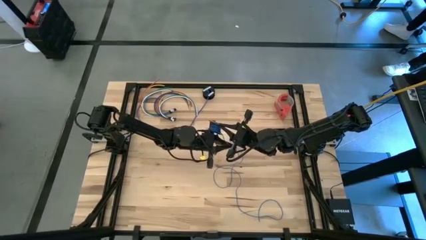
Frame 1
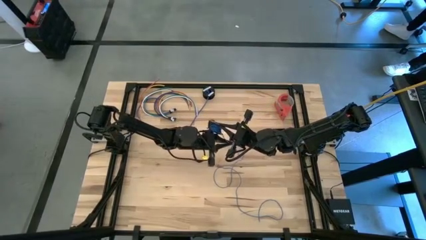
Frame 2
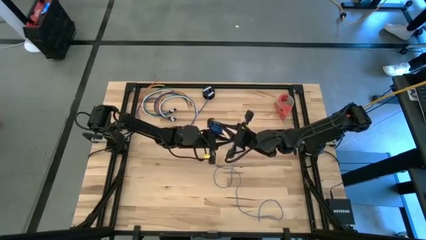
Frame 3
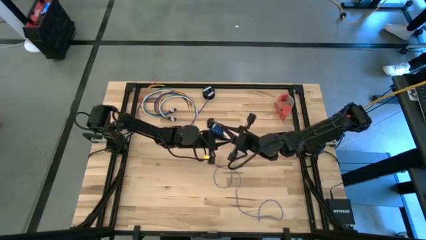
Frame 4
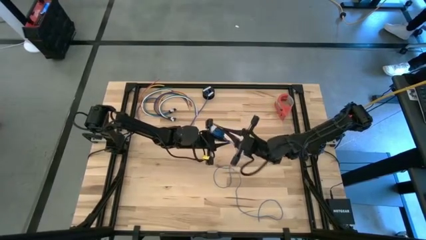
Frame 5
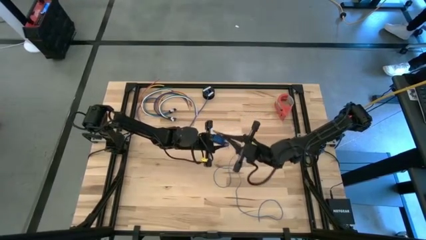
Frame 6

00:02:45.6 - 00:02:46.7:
Task: Coil cords
Coil the blue wire onto the black spool

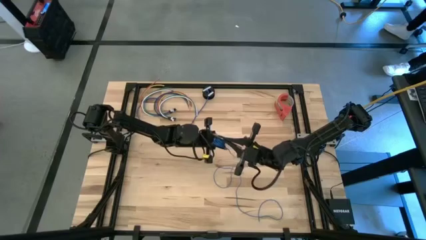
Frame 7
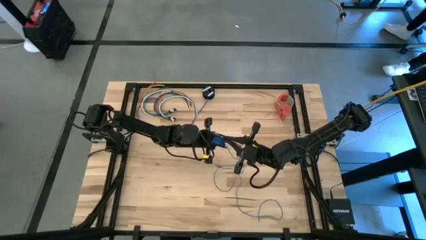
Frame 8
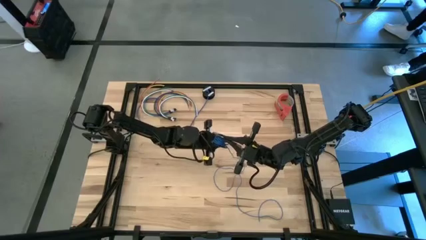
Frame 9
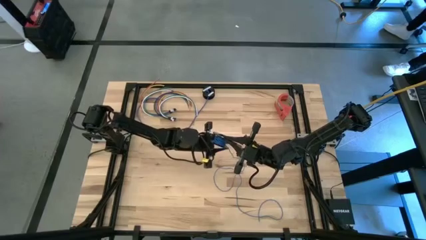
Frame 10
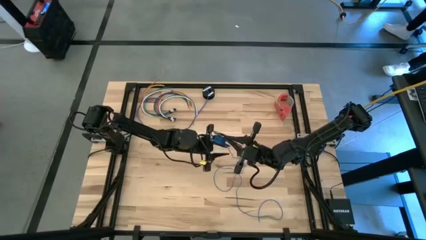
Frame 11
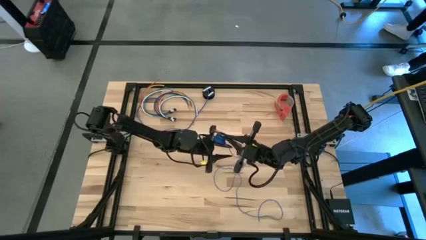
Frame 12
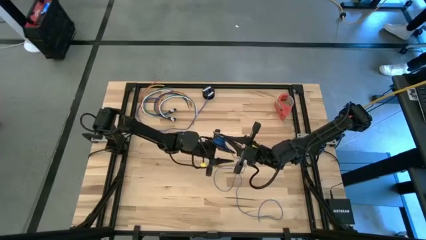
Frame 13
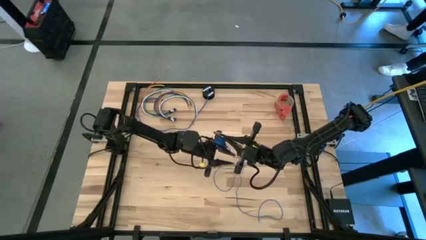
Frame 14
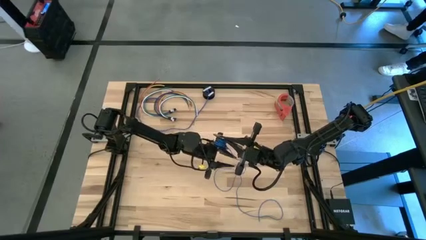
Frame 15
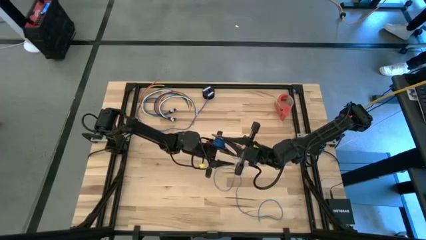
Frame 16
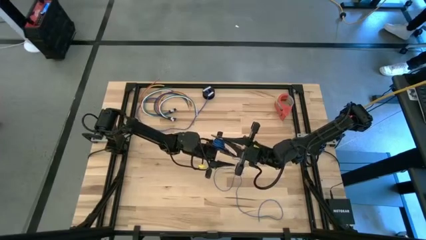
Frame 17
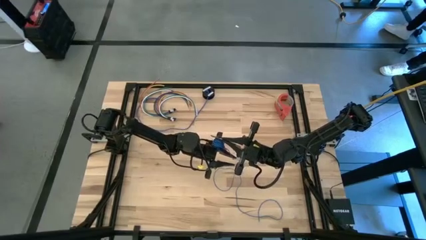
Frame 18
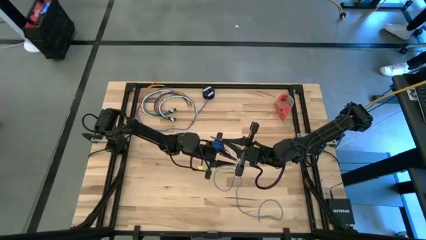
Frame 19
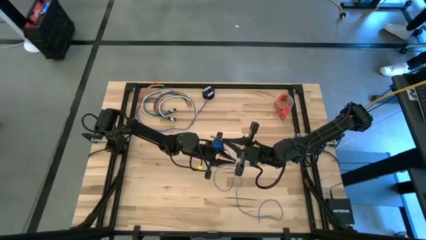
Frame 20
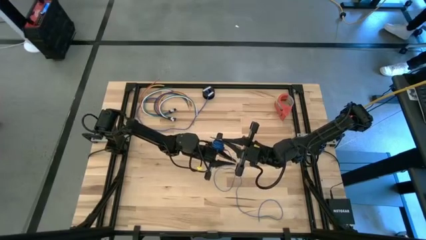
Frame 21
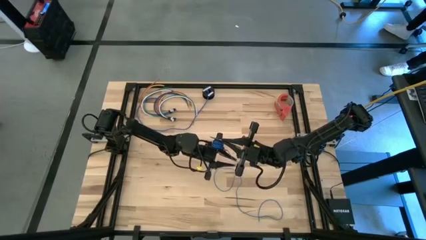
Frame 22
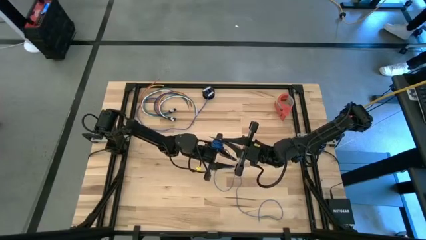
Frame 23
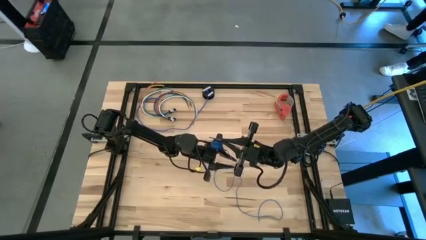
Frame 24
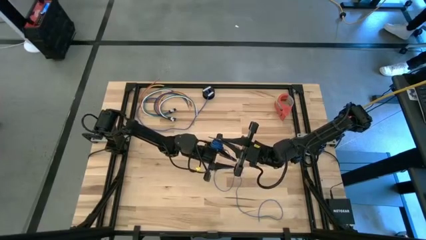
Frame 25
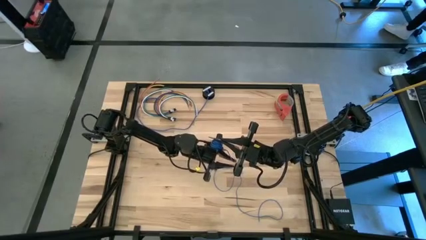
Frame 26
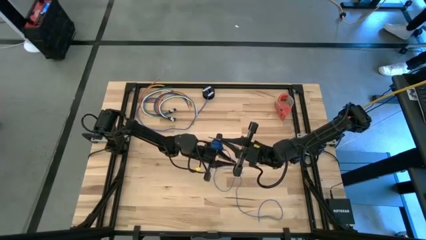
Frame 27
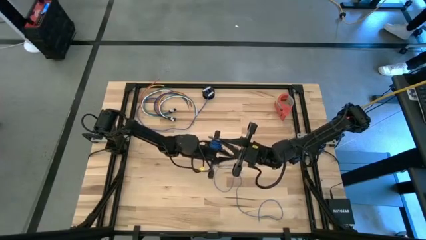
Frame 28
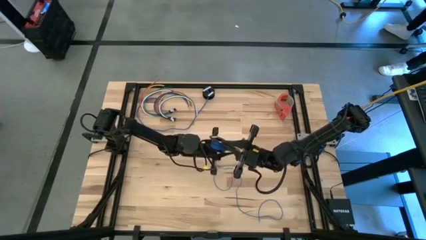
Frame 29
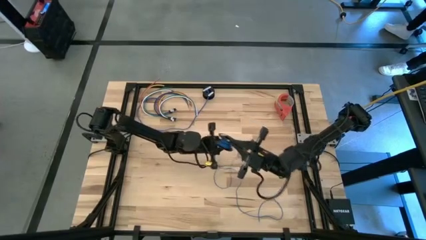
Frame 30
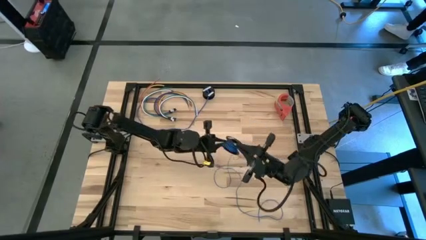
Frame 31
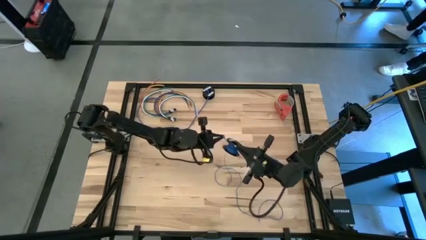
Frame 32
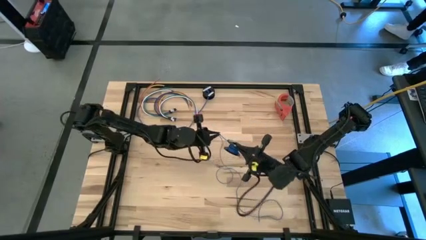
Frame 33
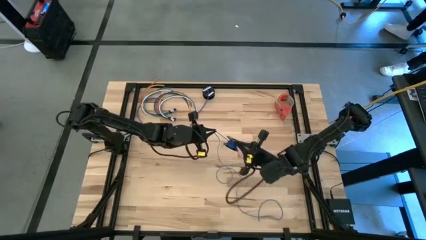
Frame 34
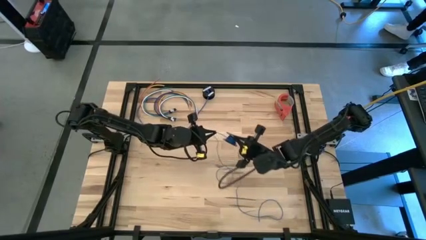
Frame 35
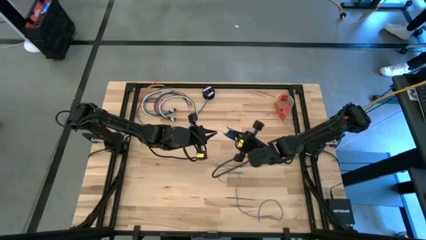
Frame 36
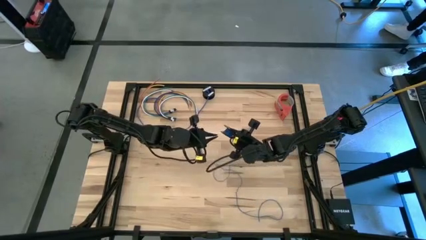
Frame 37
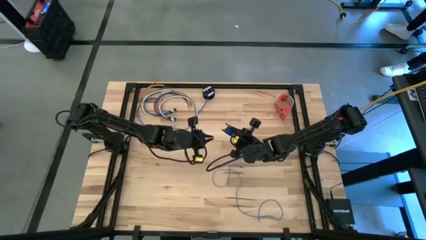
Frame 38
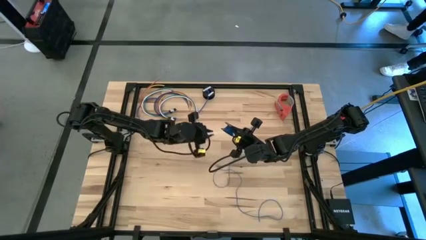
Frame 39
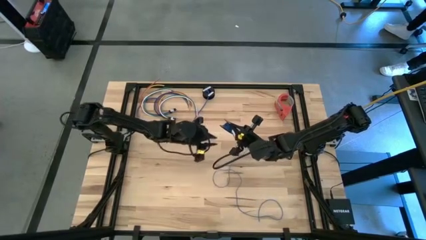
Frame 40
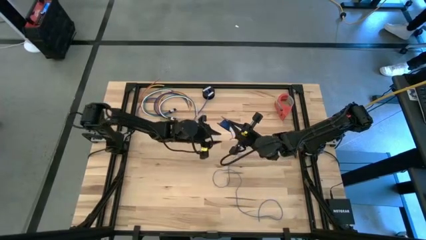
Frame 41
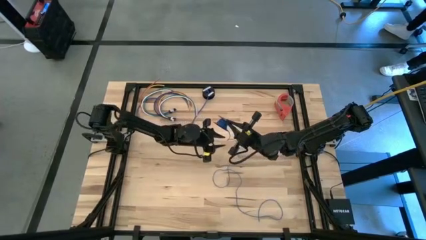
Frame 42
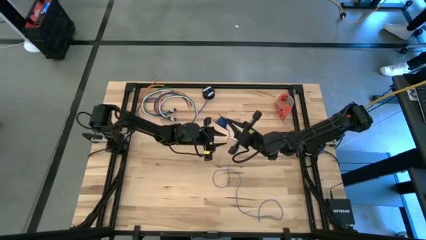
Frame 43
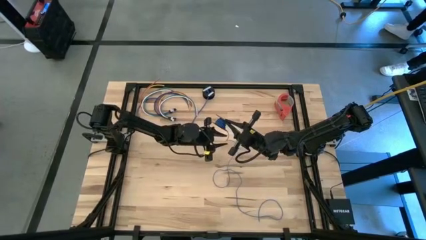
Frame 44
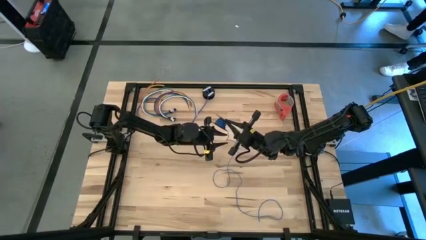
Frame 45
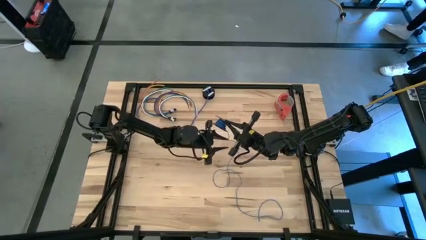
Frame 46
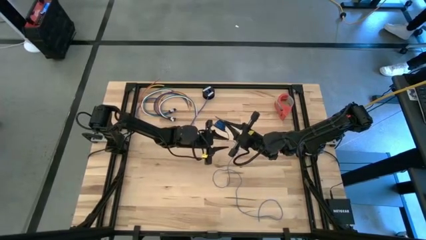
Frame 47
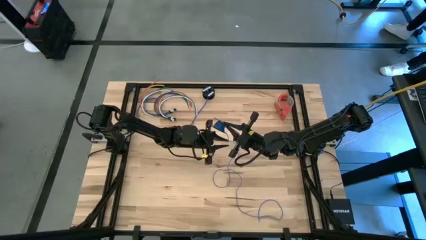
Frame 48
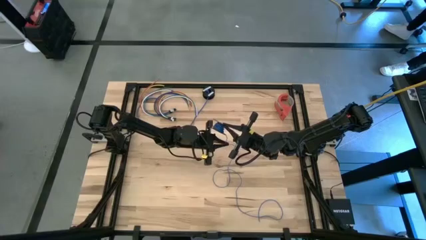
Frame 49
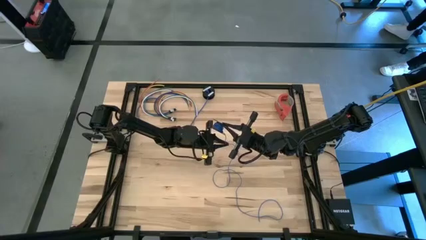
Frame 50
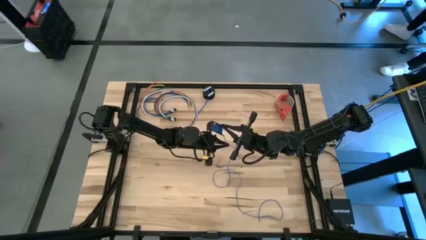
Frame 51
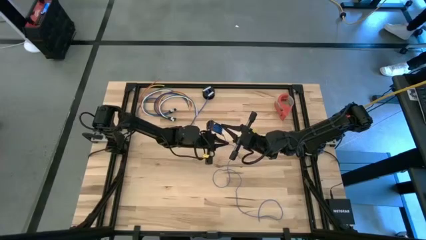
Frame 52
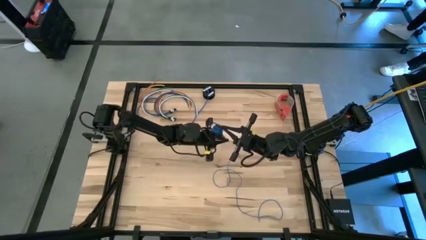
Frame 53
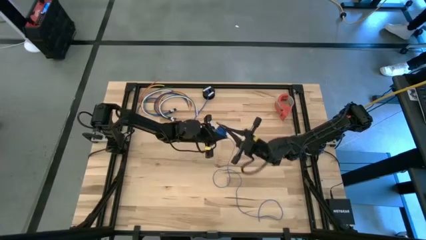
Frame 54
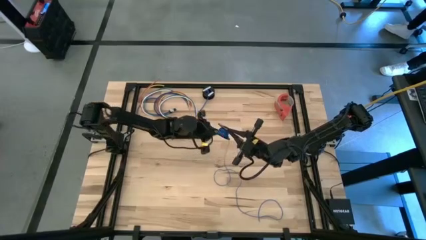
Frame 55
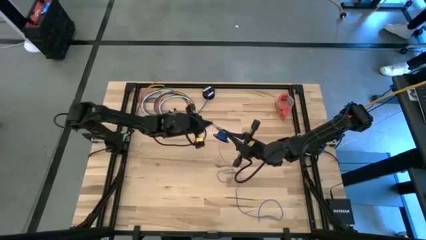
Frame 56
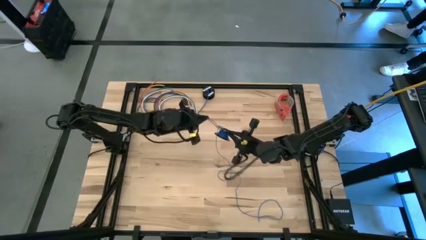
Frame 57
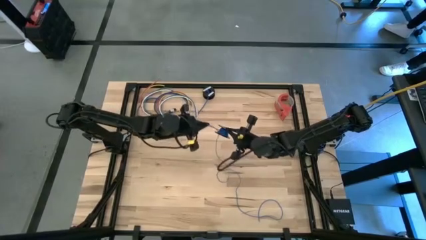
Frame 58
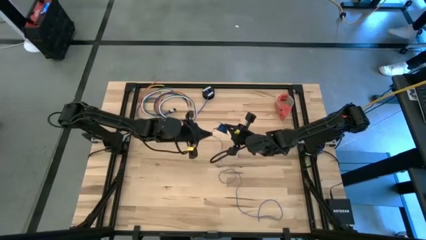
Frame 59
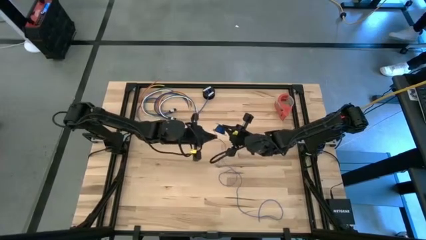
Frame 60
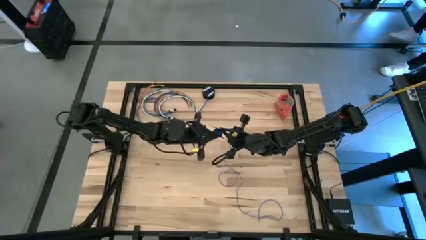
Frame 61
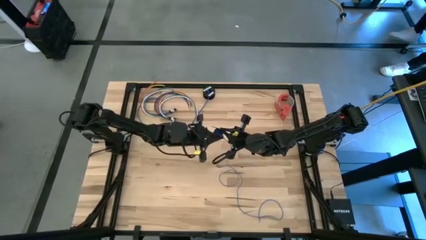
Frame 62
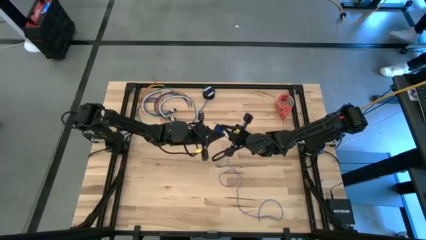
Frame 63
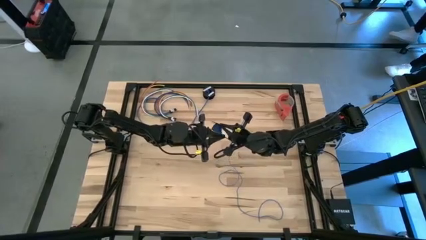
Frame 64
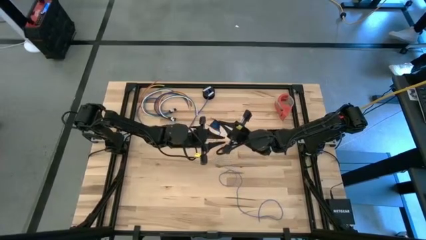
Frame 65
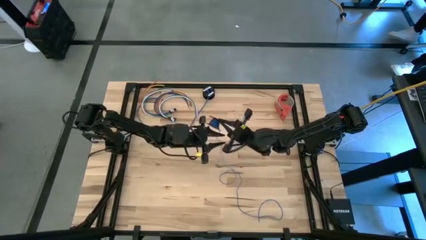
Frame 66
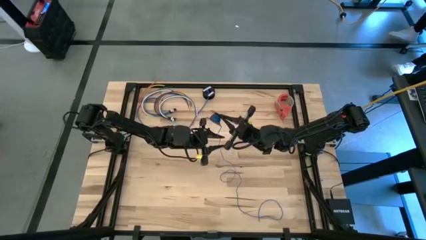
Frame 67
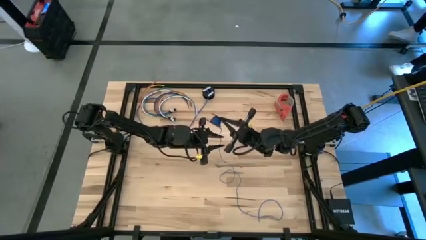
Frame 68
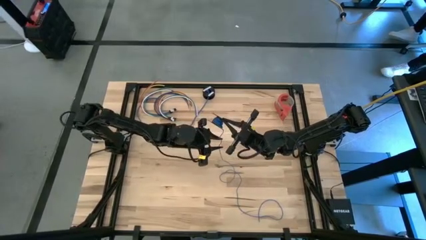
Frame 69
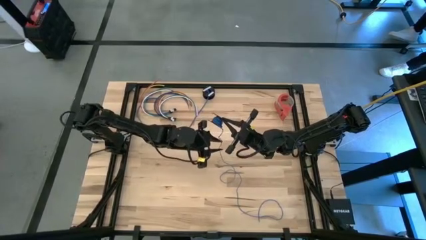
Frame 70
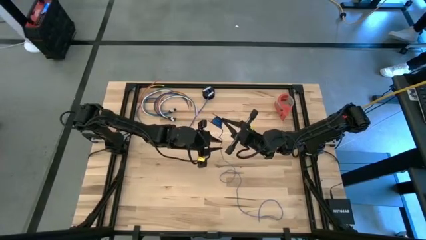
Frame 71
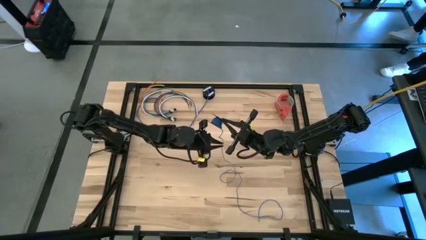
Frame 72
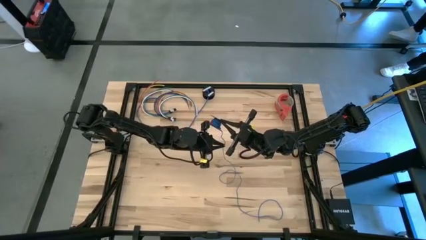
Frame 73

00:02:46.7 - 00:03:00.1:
Coil the blue wire onto the black spool

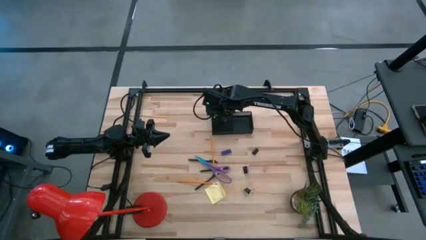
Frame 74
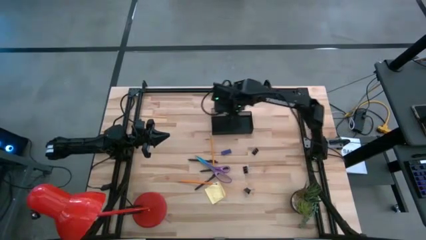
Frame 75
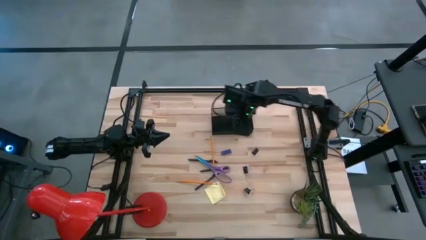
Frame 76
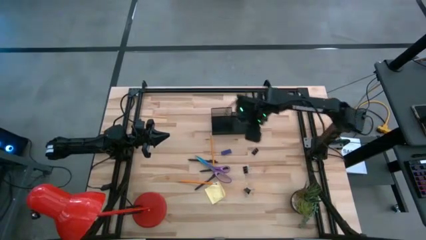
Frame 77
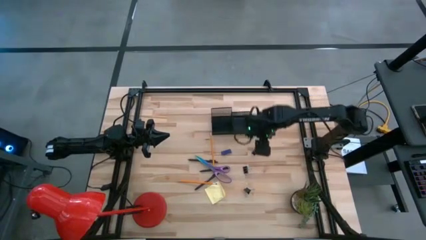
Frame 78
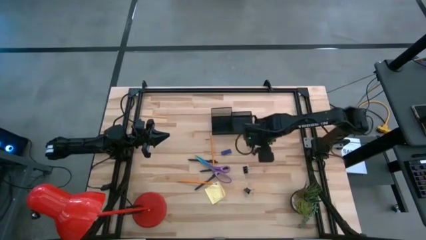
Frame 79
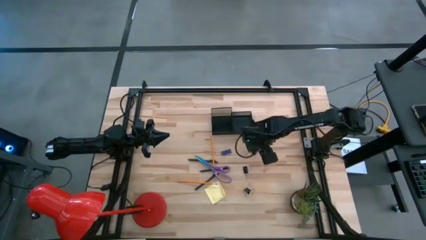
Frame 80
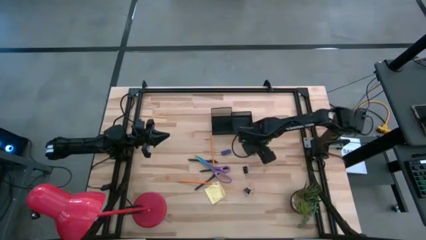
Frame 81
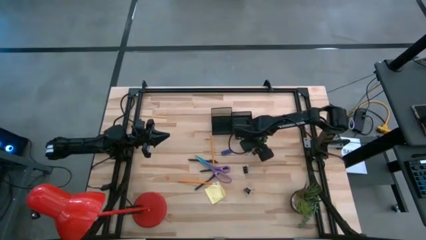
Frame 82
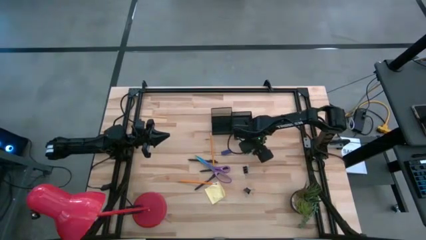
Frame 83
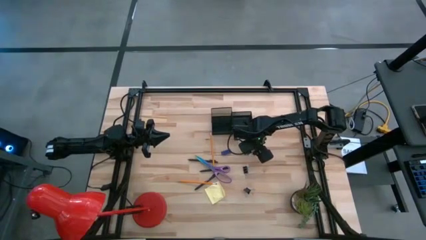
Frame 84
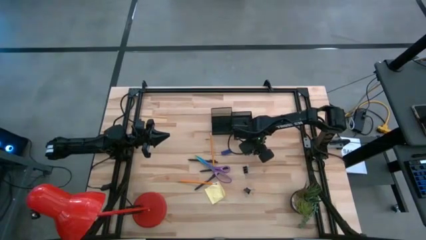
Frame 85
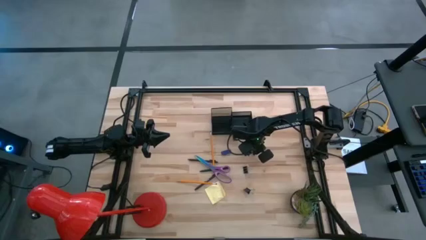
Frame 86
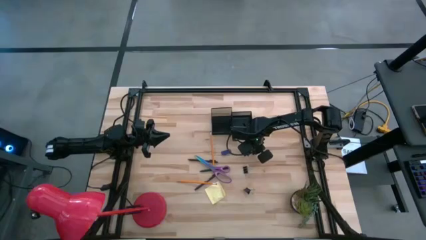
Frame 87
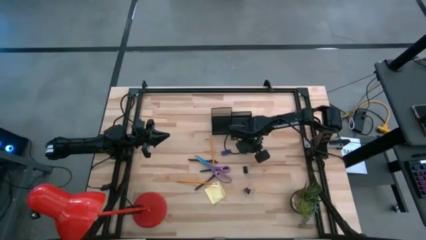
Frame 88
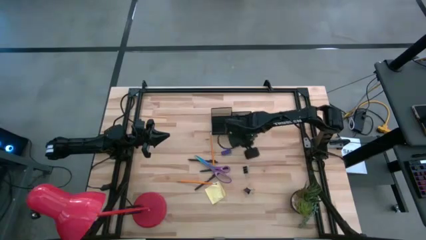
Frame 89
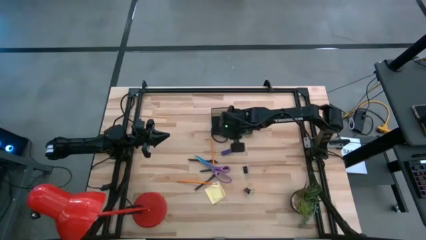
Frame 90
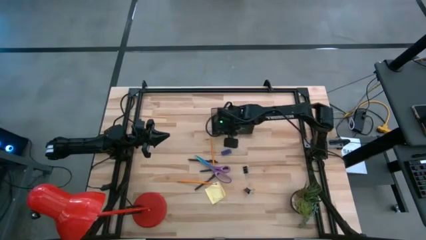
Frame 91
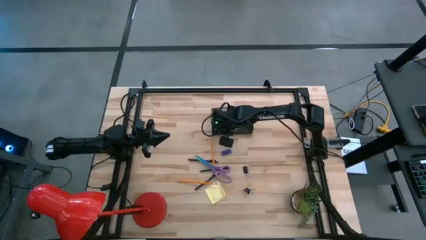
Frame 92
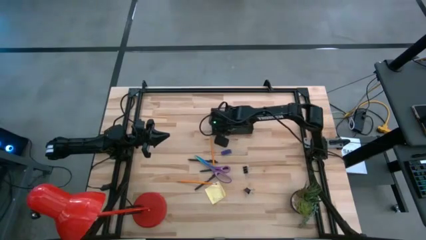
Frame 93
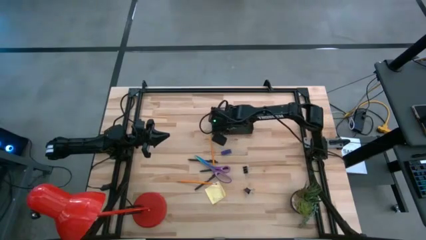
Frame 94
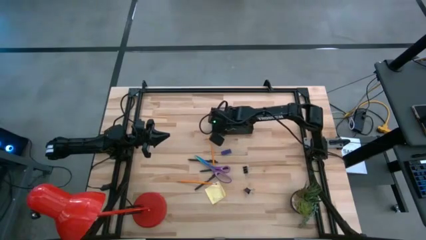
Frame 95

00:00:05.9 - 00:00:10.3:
Task: Pick and place office supplies into organizer
Put the top black binder clip into the desk organizer
